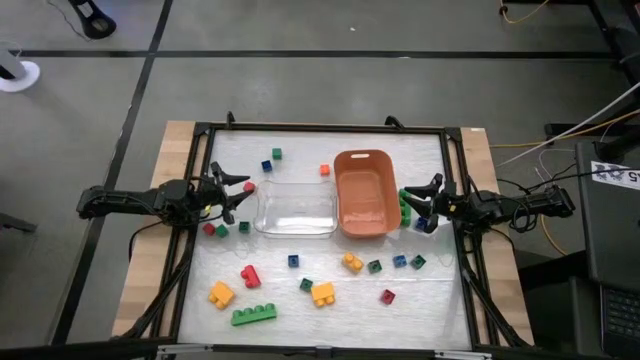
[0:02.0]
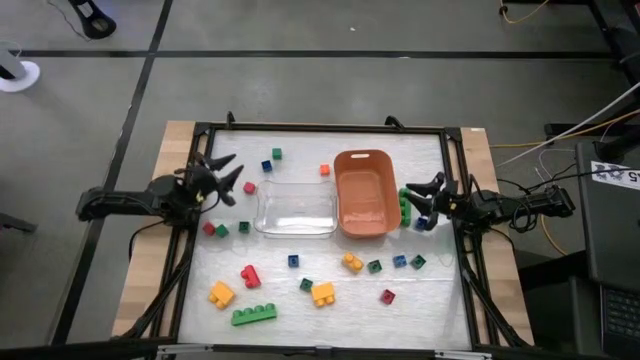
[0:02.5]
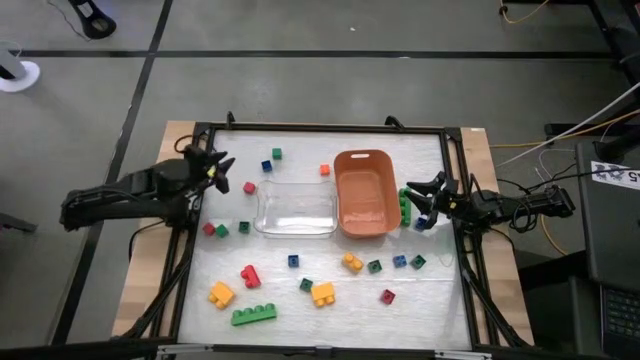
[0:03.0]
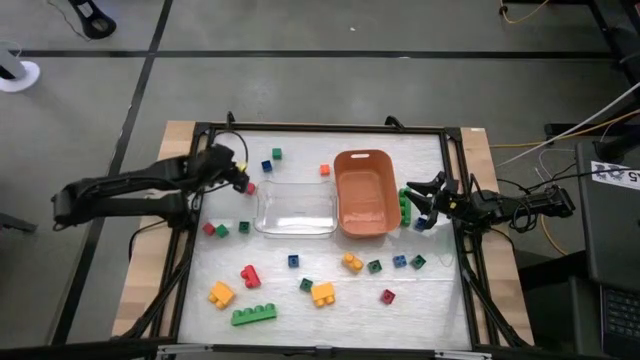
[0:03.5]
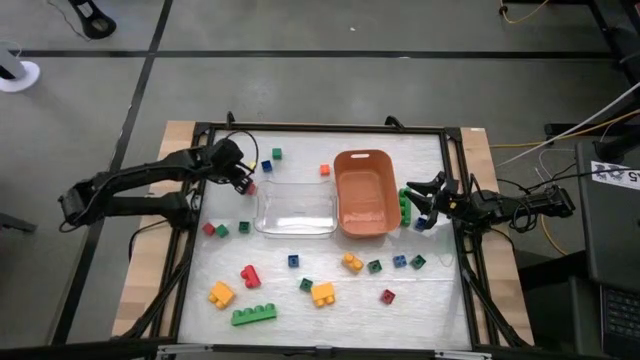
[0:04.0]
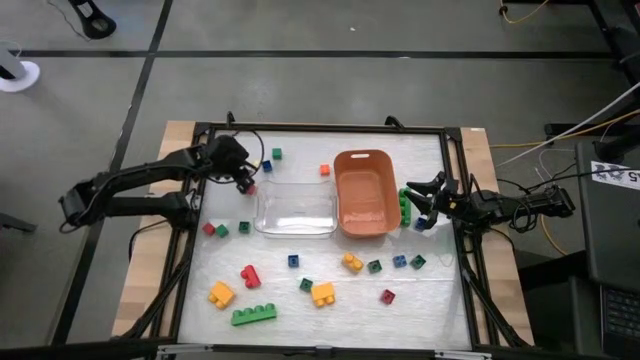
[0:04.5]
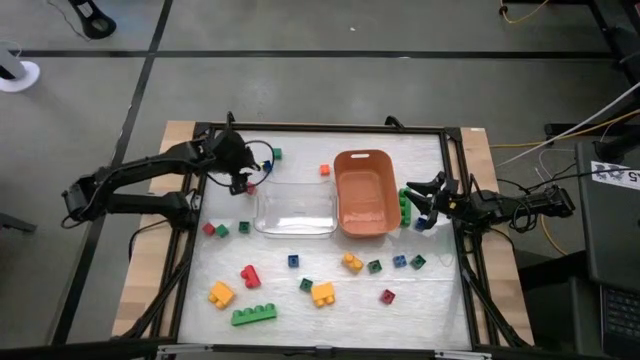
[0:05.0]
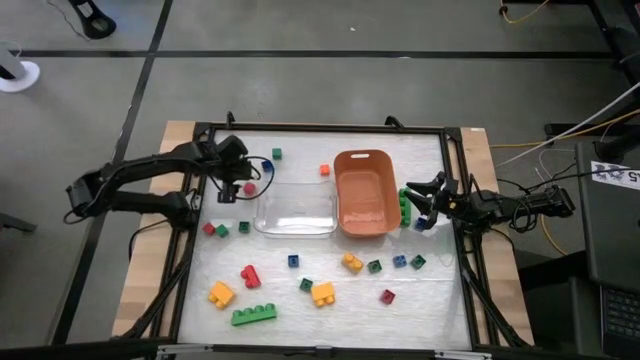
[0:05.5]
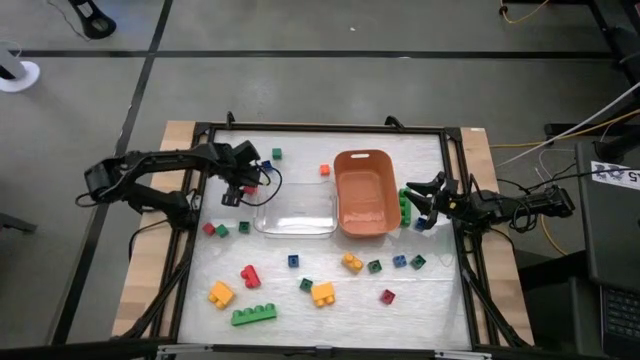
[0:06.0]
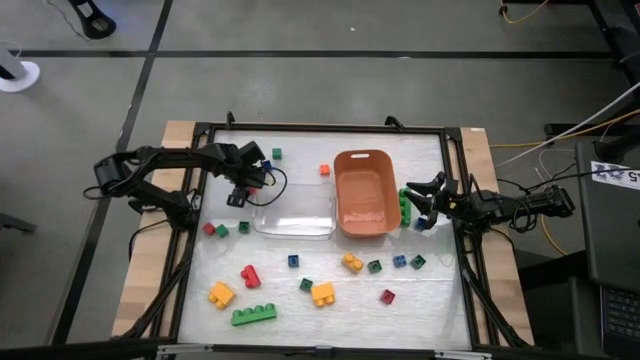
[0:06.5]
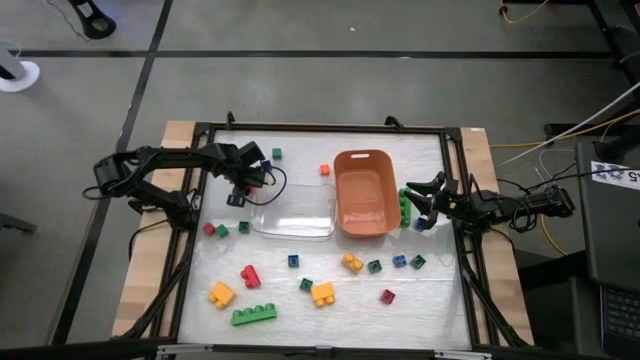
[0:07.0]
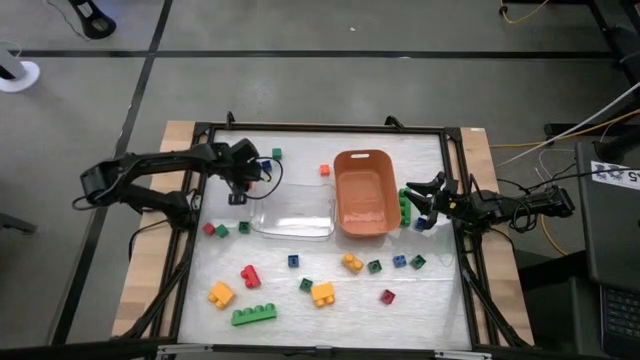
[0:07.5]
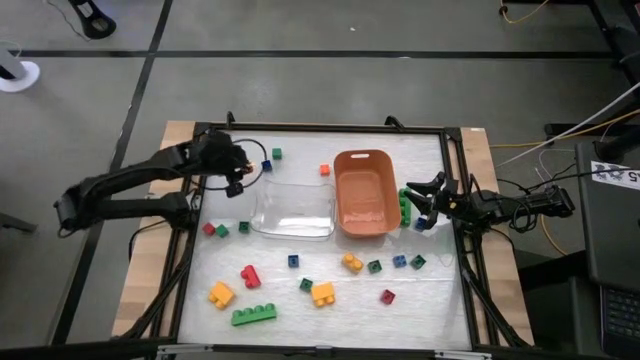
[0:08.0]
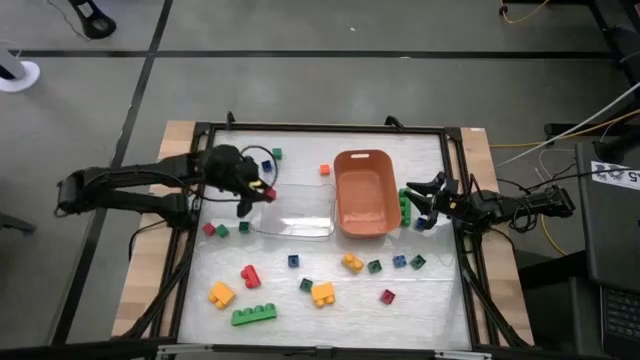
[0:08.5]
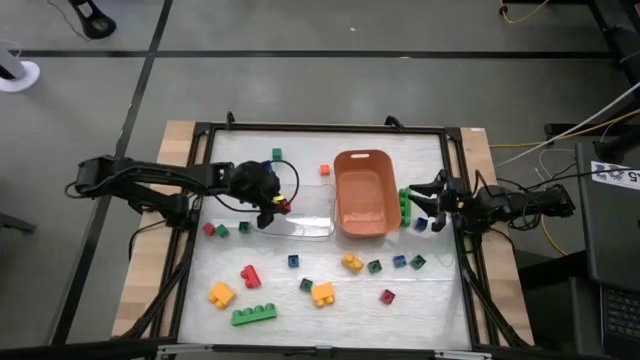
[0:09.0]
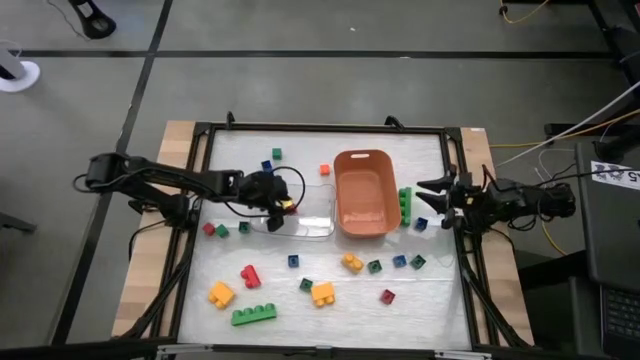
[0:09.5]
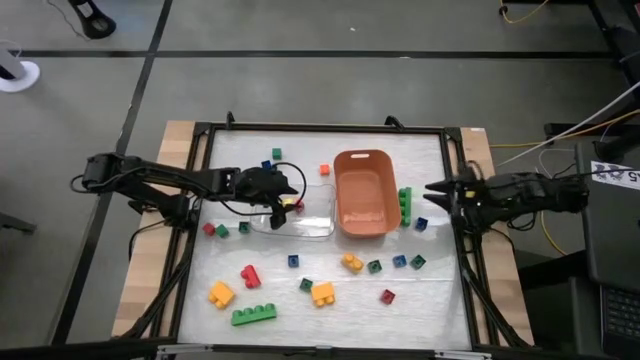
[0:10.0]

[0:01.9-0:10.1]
Task: Sort blocks by size
Put the small red block into the transparent bin

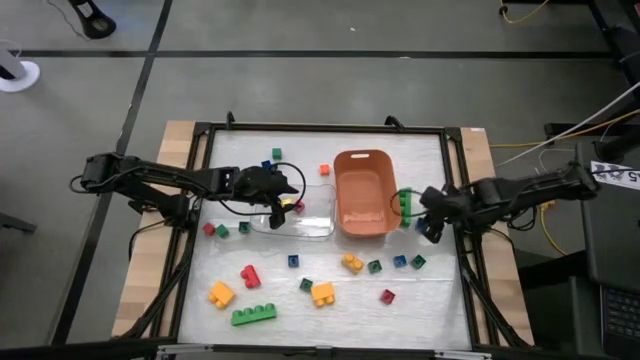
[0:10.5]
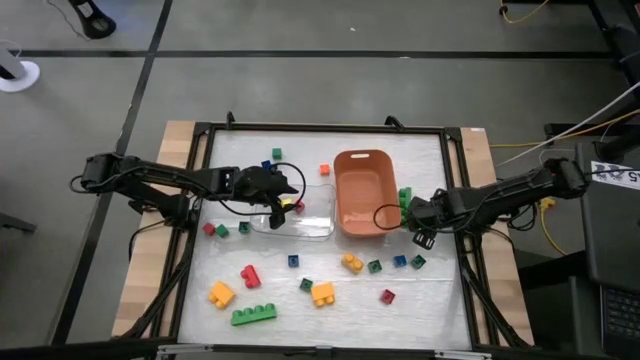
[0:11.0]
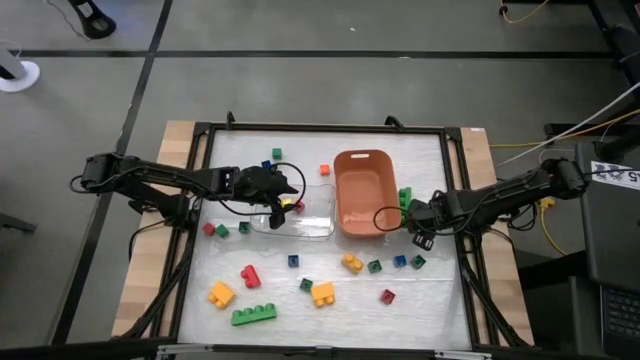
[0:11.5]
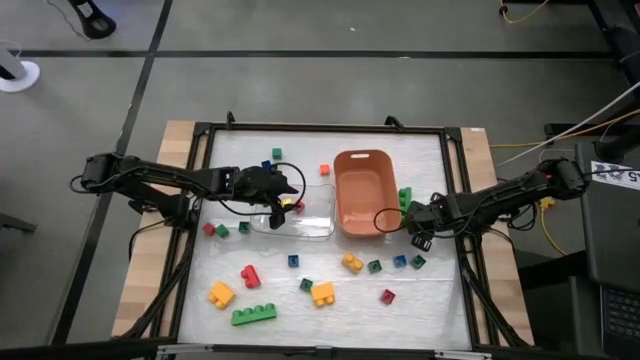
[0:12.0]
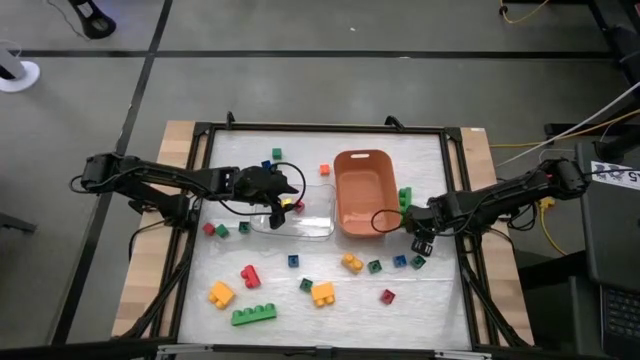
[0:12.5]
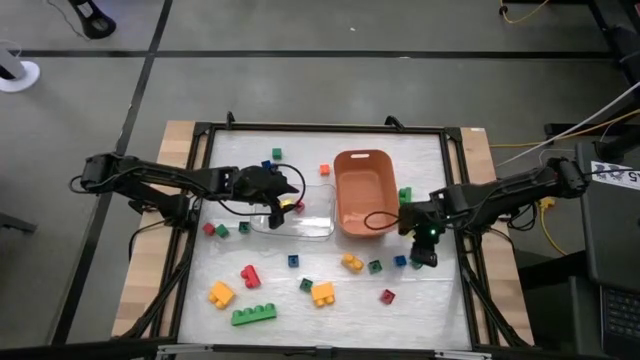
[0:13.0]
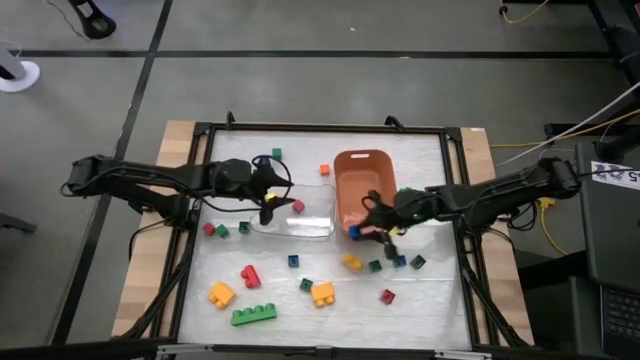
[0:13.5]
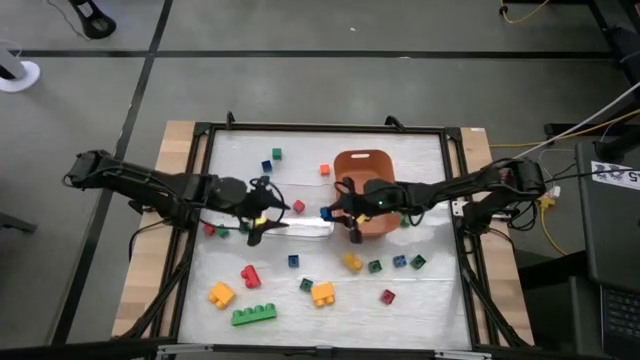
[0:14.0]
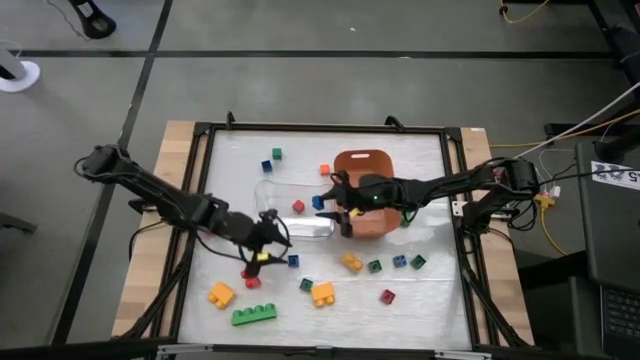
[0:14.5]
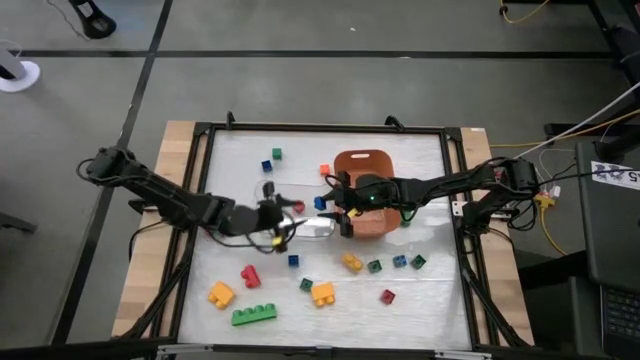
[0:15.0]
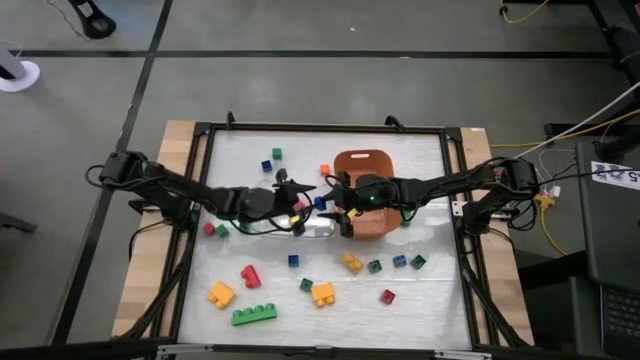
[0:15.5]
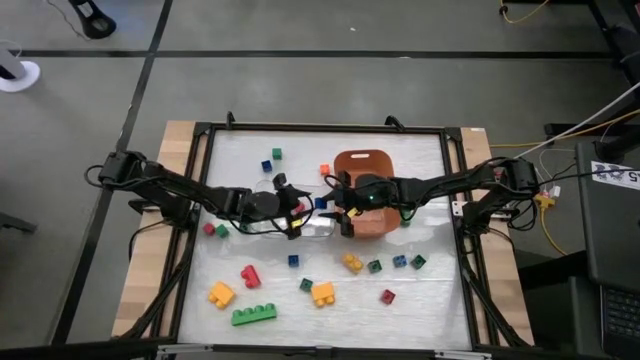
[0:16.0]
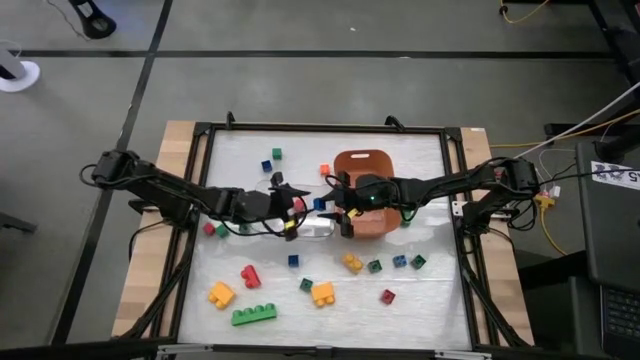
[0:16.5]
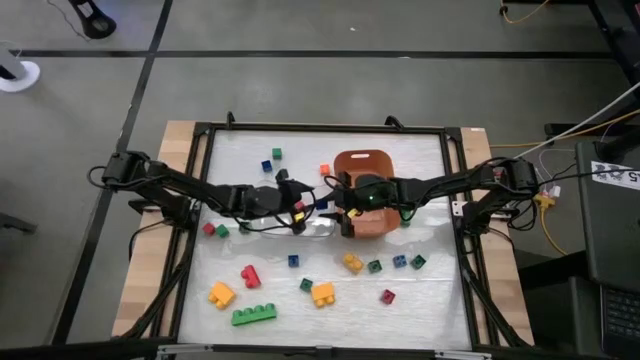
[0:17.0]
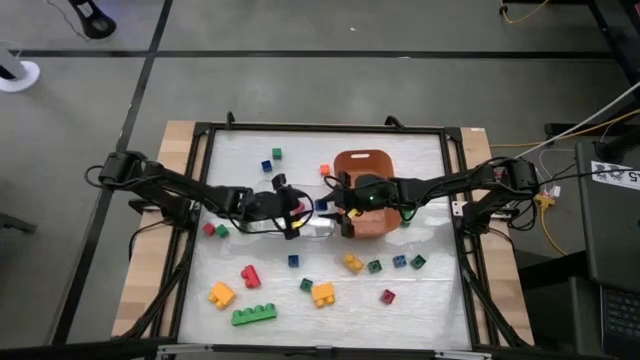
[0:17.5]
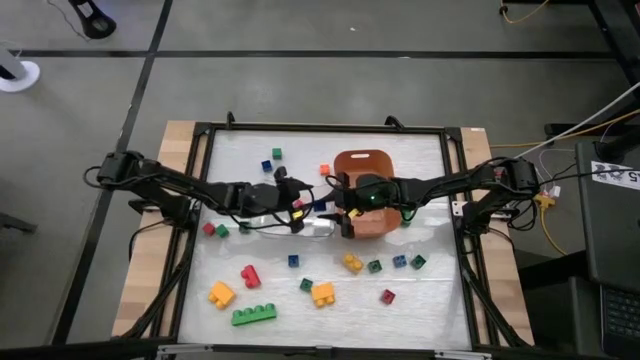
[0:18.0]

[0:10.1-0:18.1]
Put the small blue game piece into the transparent bin

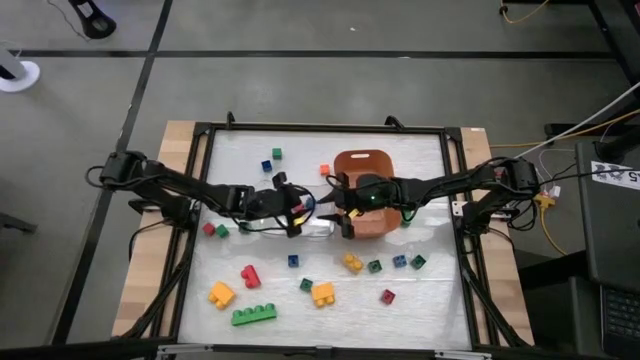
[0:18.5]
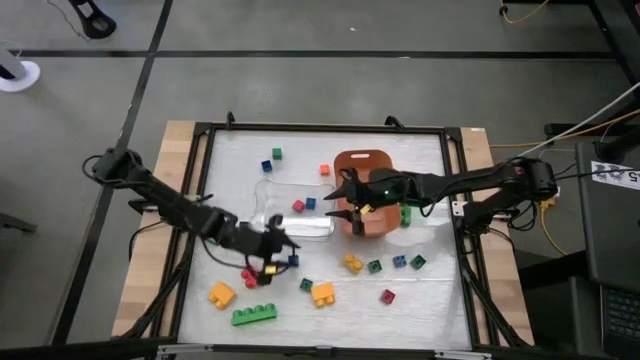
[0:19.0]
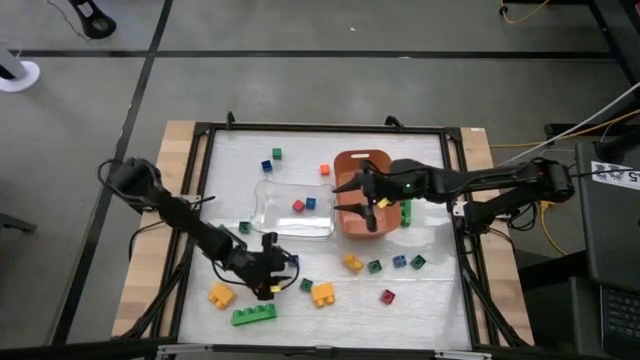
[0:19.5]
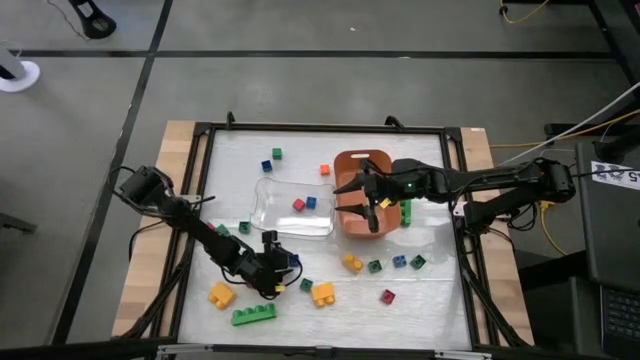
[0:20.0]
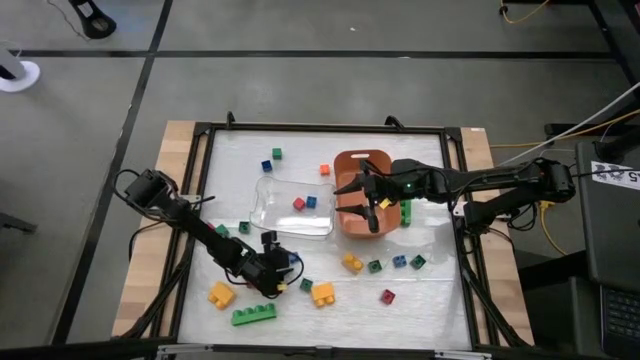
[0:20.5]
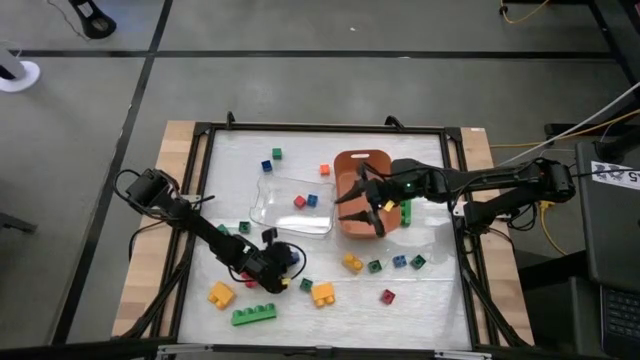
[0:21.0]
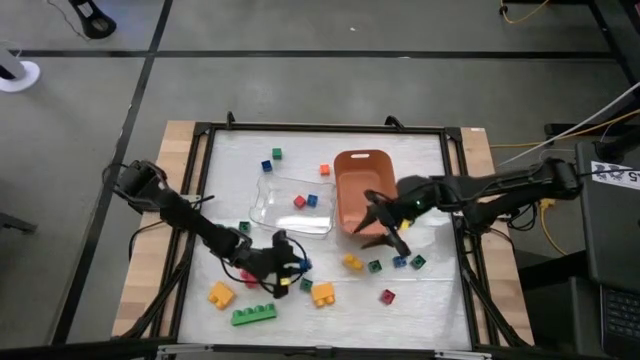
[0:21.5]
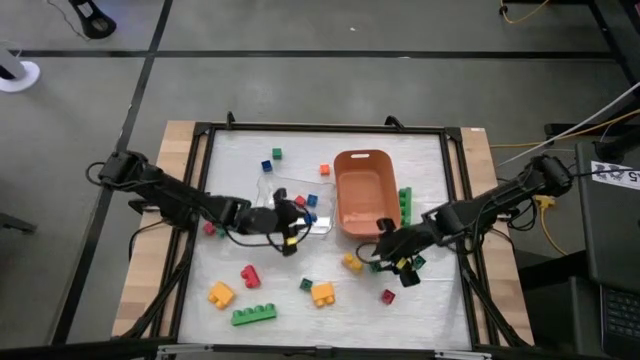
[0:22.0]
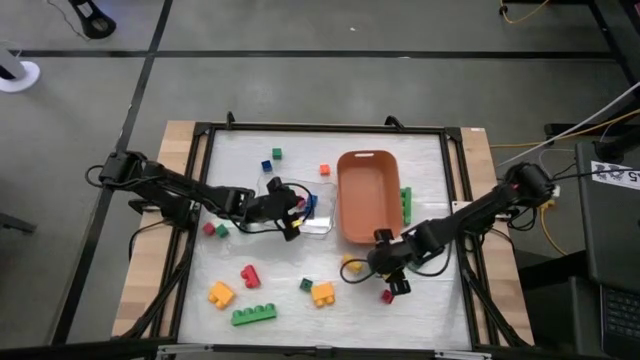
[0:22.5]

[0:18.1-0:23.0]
Put the small blue game piece into the transparent bin

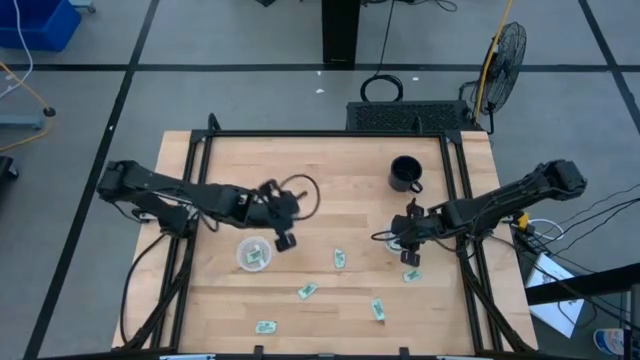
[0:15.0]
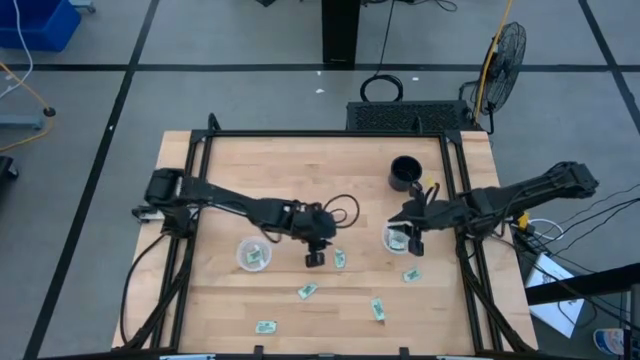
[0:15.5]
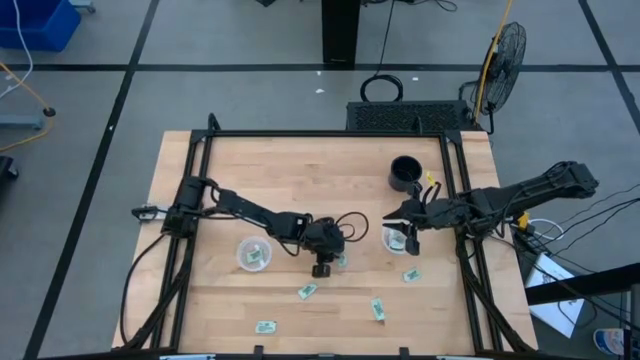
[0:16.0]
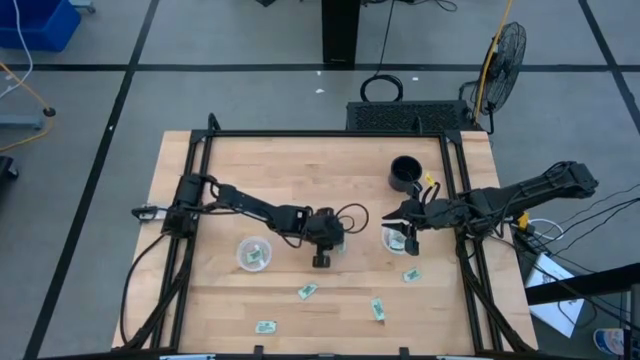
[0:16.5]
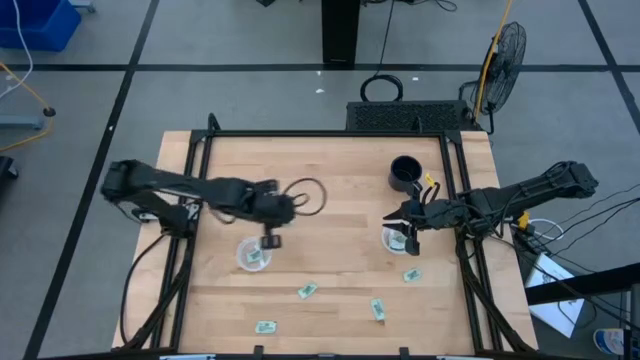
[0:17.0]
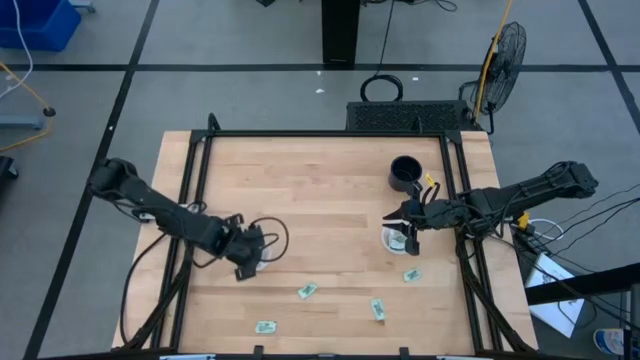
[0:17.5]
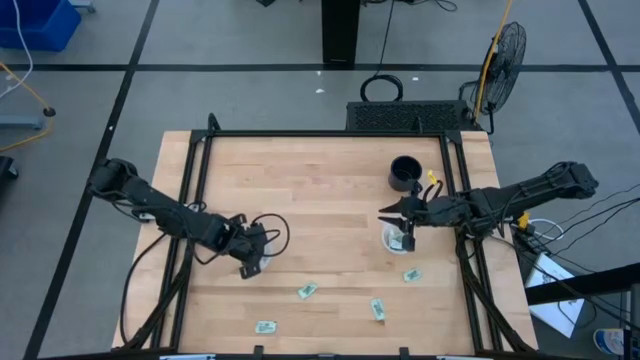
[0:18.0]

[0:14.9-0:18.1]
Task: Pick and place items into bin
Put the white stevia packet into the left transparent bin
